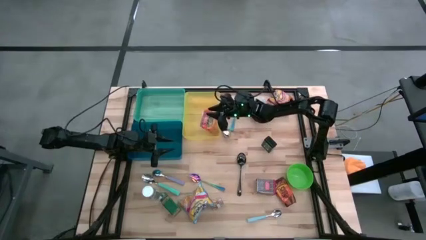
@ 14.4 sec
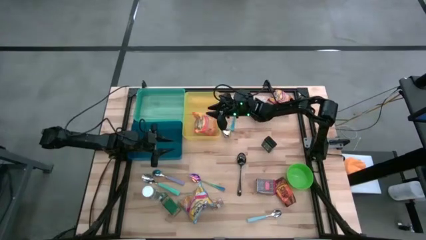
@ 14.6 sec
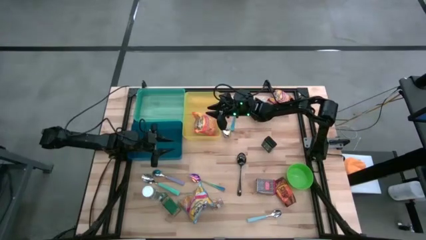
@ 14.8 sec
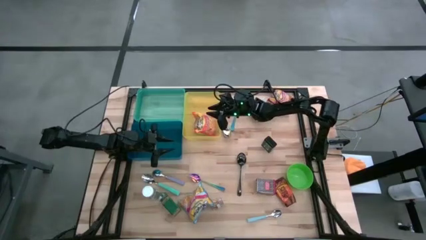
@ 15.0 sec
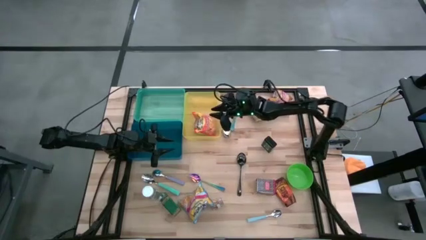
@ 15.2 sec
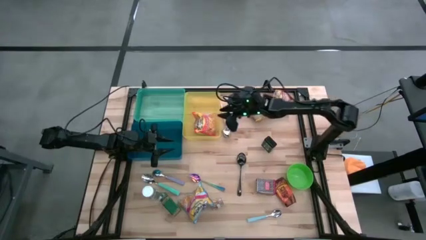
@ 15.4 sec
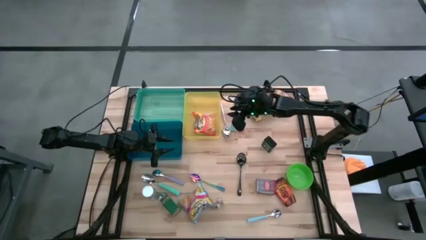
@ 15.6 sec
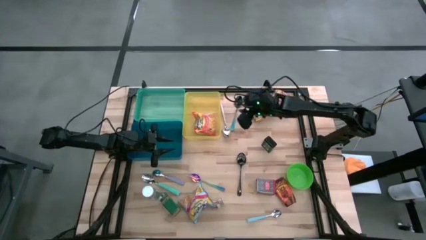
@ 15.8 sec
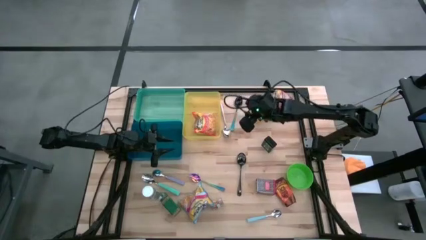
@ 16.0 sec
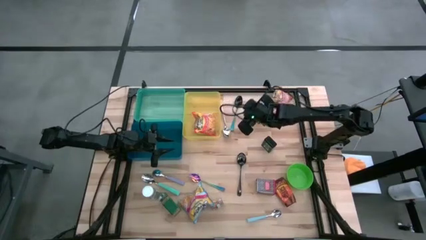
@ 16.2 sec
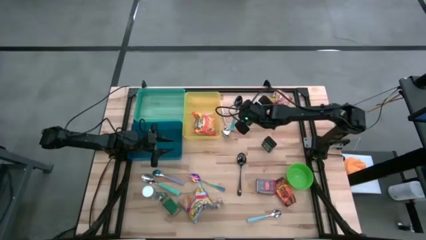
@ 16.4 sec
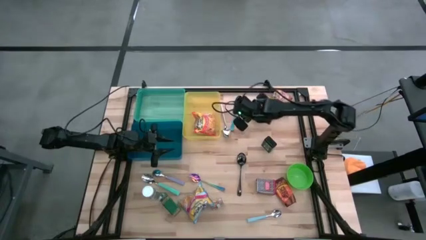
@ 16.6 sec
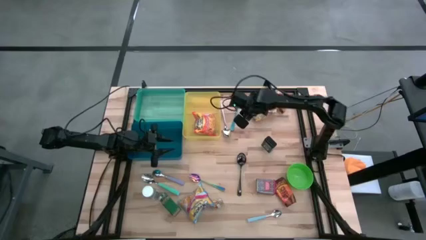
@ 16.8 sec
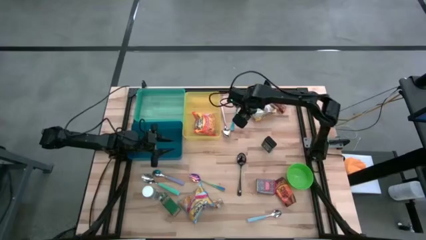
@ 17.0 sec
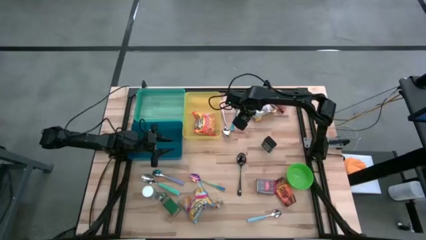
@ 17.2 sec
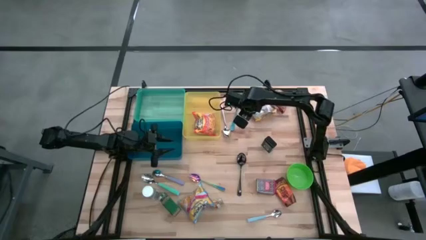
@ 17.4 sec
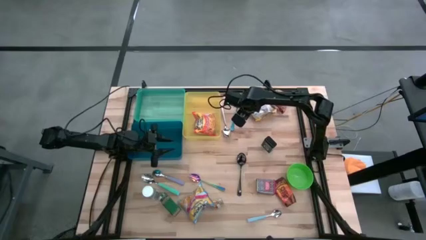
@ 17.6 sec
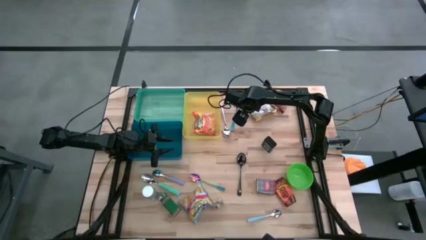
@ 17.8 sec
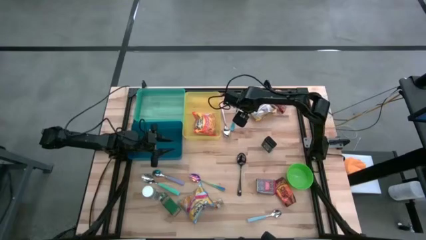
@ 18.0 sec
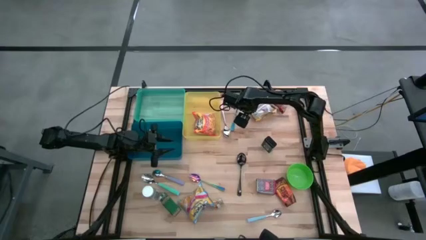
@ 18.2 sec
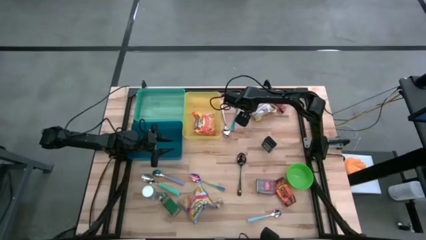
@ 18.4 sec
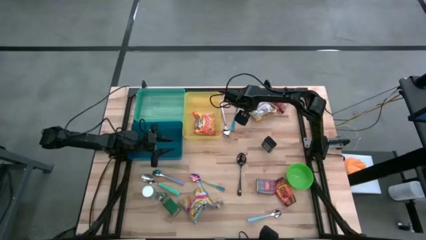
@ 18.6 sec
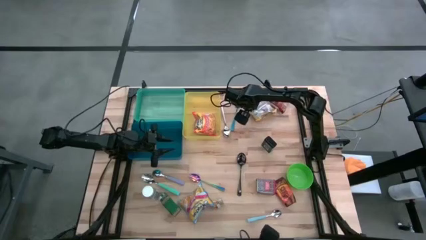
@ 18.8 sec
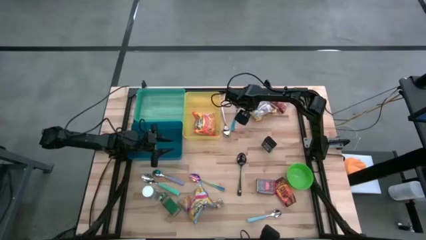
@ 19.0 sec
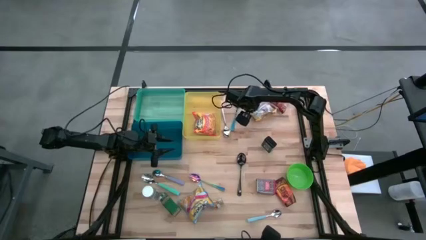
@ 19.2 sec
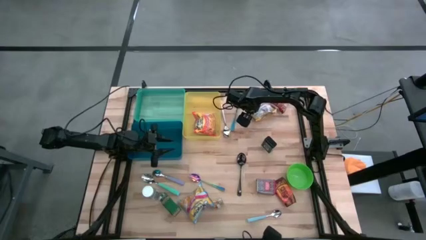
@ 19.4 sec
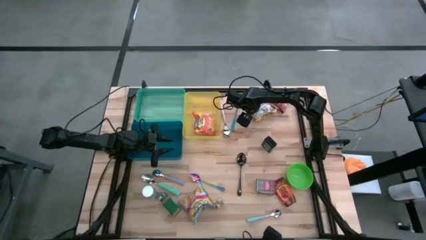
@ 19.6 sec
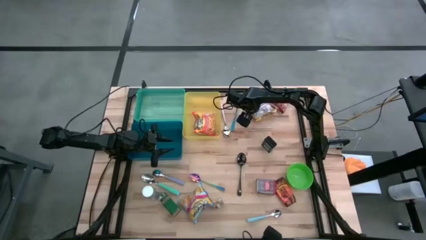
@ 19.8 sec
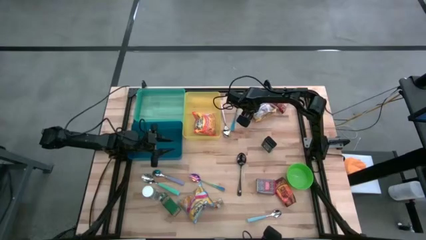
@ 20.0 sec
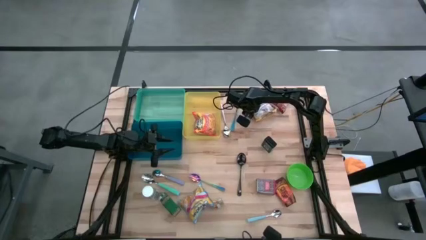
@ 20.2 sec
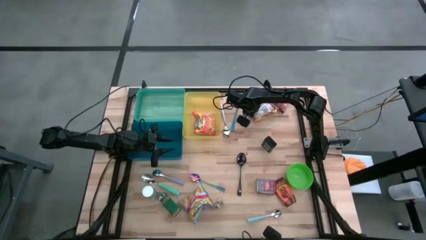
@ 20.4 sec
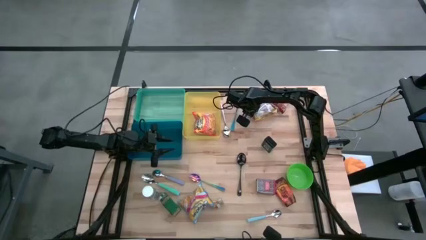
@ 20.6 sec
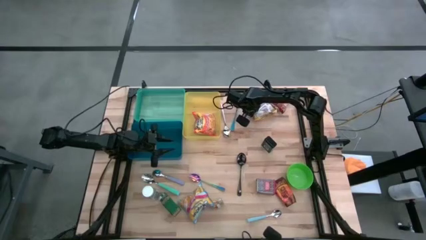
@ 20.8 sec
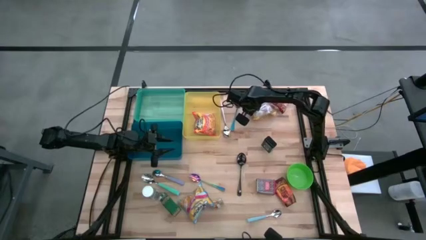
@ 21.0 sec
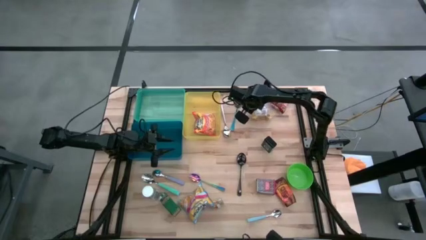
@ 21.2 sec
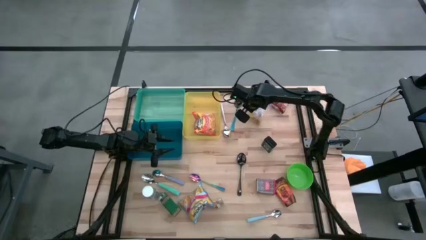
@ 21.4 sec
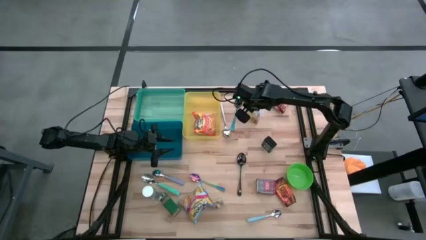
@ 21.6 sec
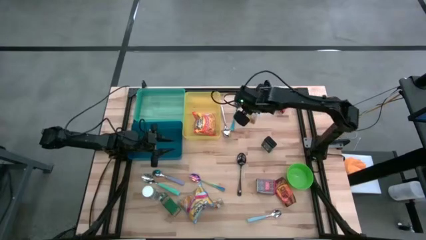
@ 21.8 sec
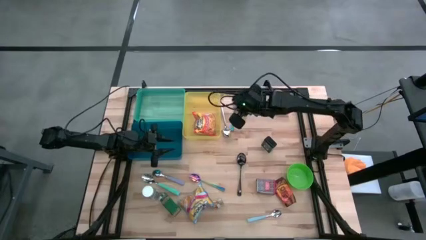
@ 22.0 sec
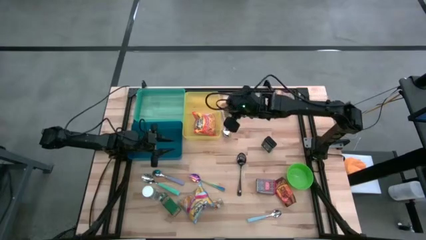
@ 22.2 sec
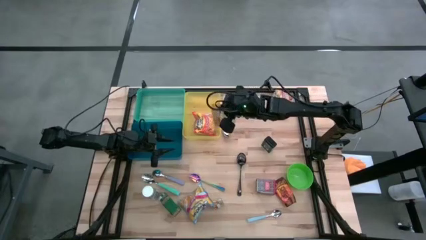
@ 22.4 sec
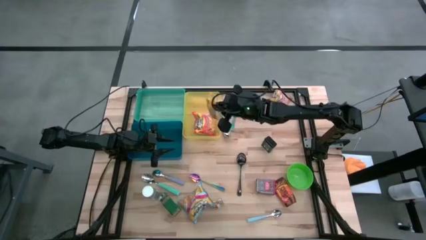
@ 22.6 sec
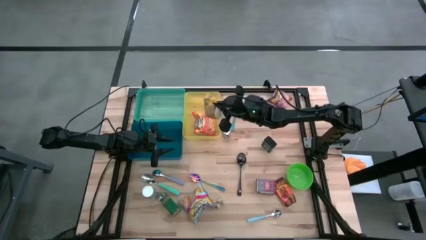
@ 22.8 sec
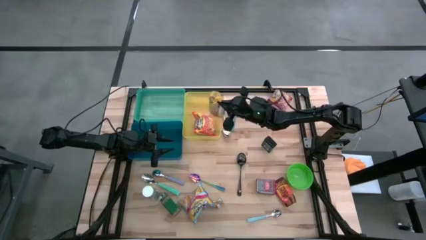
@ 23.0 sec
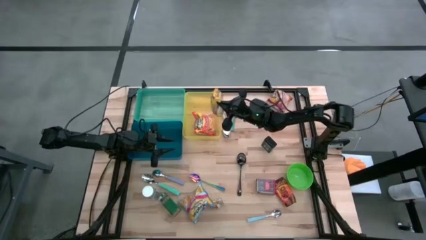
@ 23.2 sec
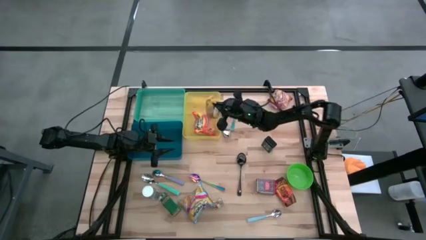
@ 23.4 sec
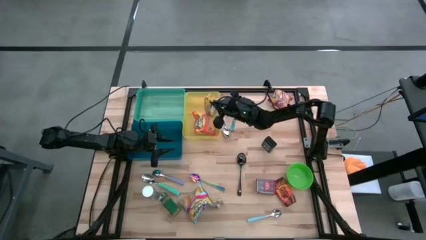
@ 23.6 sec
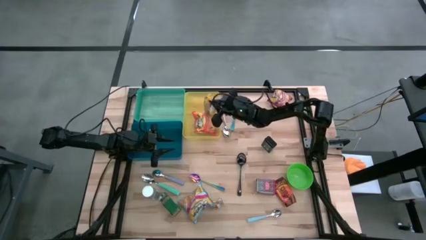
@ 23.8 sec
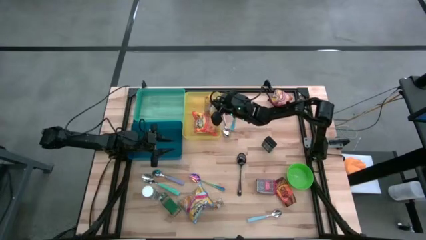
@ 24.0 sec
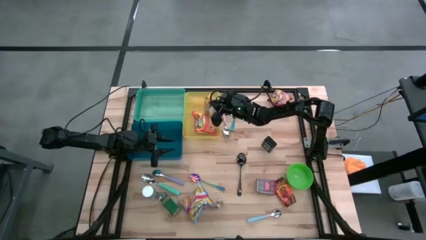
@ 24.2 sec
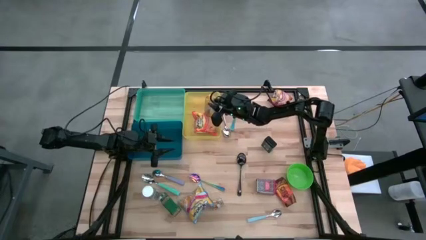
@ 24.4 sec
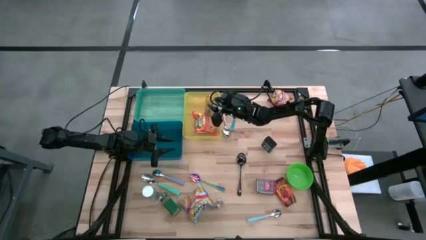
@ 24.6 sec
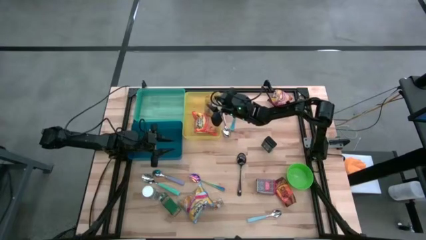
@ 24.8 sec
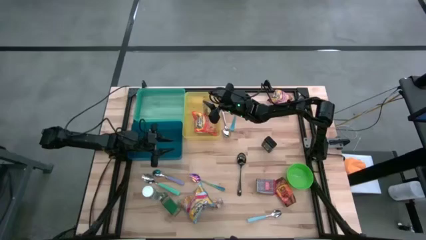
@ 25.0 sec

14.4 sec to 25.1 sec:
Put the yellow noodle pack into the yellow bin

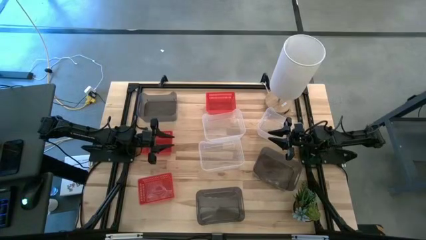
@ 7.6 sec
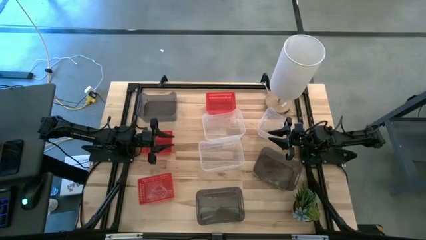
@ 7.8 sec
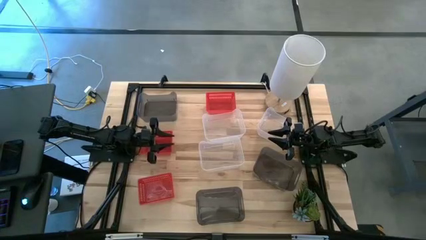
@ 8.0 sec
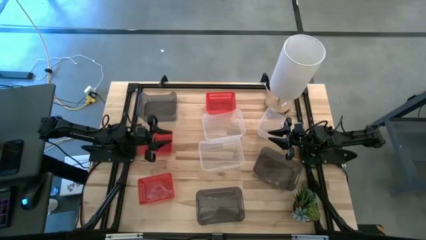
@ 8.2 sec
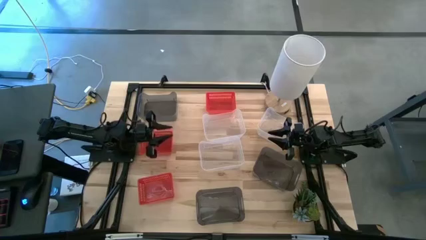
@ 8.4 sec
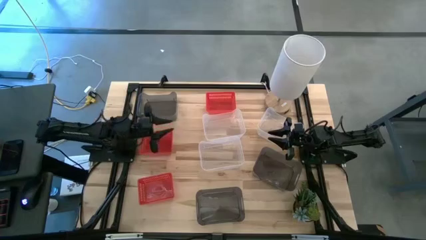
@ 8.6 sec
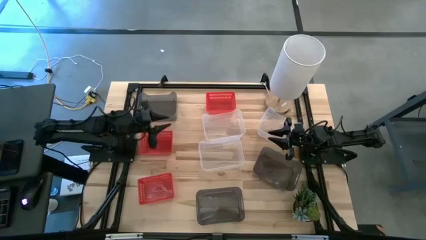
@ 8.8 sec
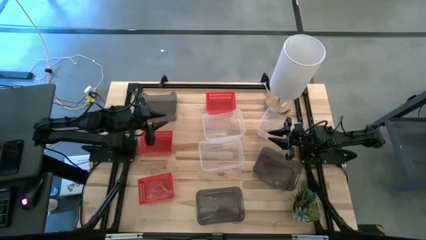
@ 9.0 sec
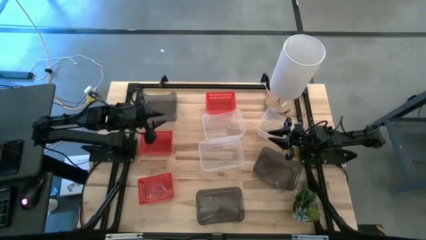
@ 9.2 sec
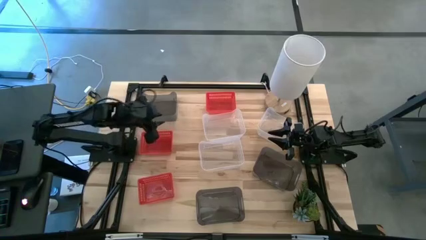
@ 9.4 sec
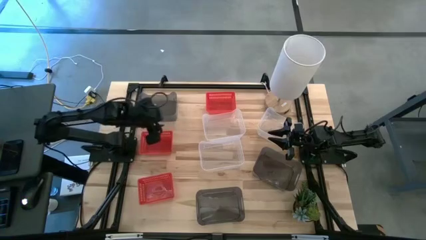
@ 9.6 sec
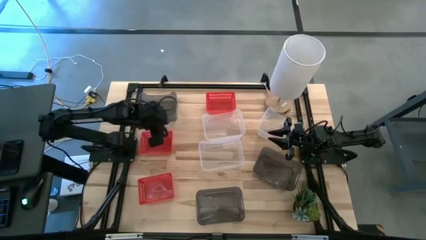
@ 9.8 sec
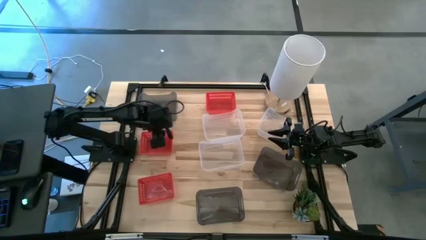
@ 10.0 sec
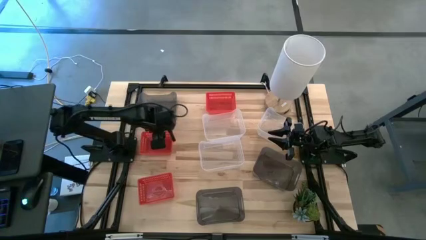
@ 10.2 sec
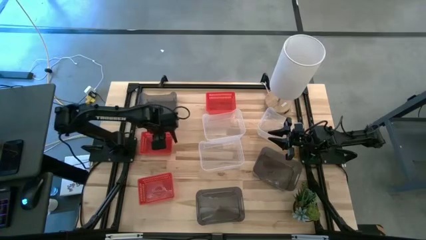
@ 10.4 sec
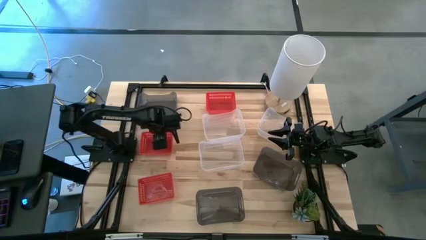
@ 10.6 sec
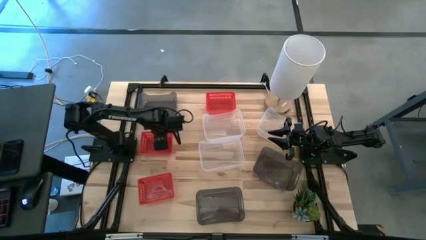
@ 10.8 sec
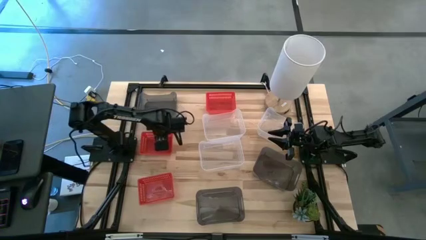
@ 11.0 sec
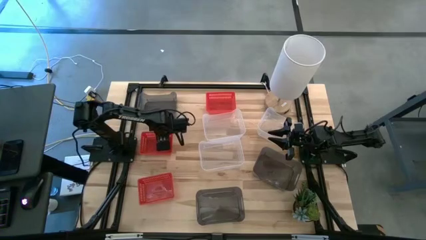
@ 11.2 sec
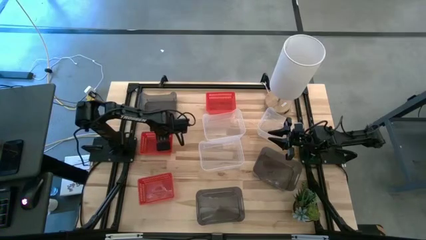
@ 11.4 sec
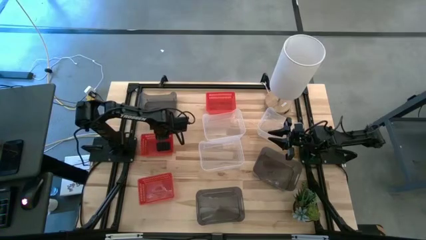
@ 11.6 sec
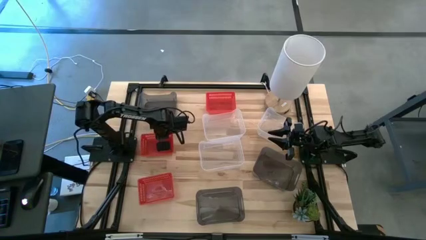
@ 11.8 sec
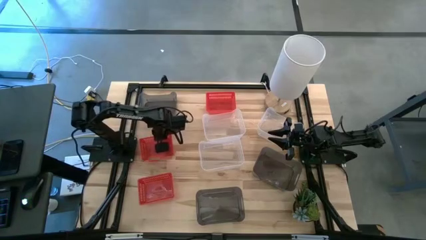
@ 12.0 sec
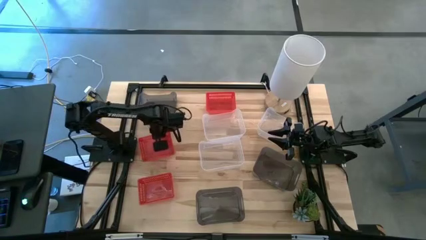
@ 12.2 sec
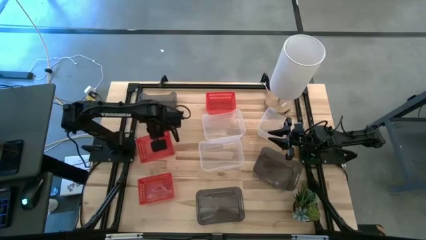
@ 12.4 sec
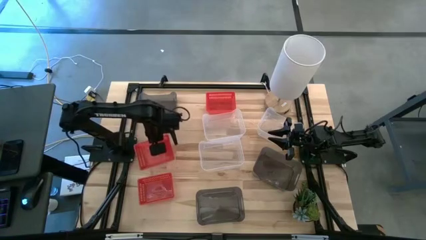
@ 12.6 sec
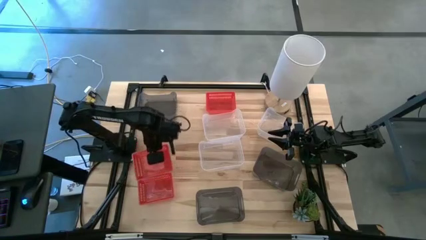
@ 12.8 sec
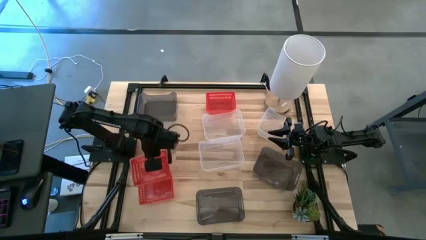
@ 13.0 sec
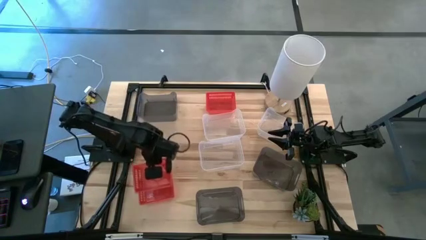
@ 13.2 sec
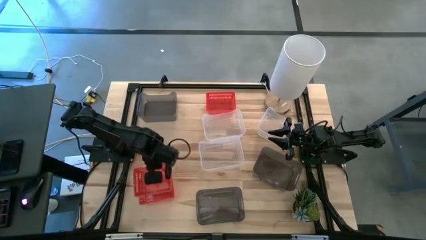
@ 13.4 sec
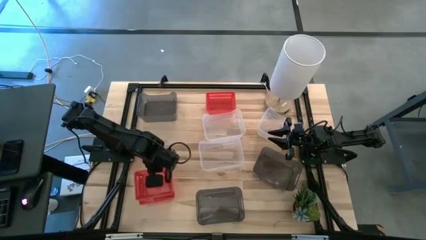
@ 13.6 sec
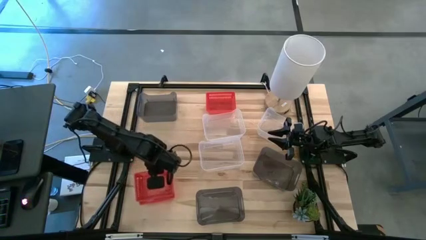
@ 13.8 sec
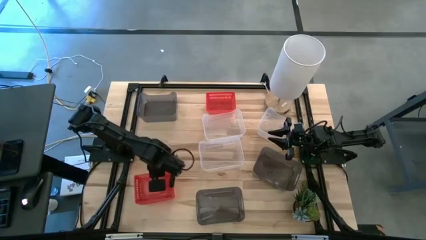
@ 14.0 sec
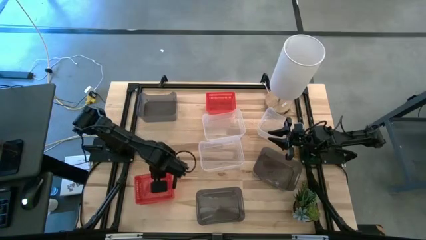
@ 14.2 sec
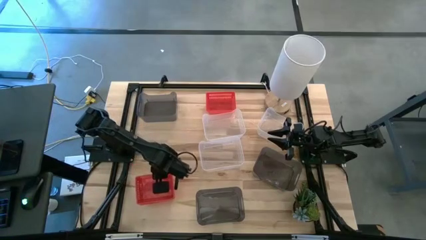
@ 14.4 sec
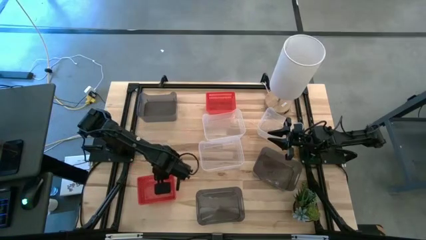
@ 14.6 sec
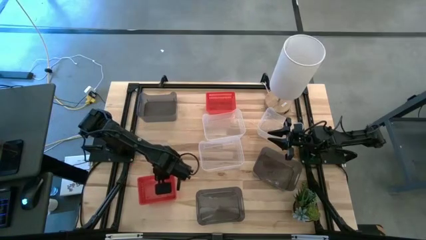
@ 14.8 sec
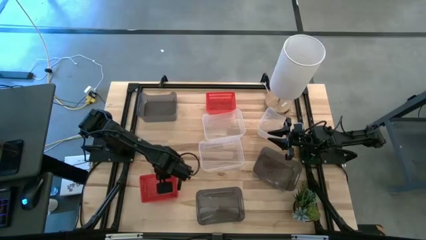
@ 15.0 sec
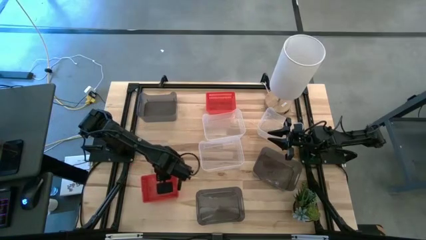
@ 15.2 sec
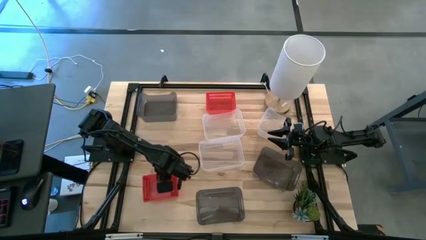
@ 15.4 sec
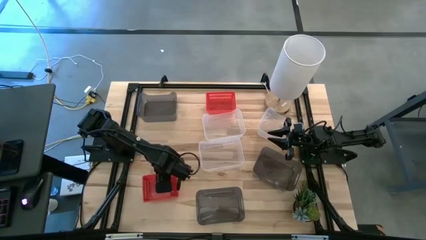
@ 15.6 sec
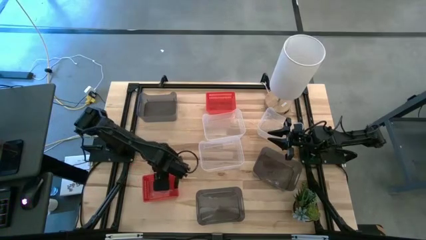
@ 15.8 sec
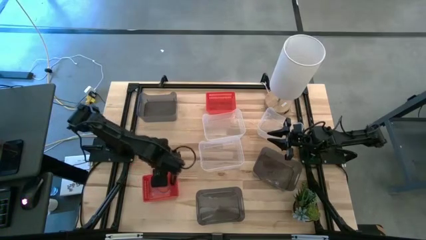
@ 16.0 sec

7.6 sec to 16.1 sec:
Stack the center red bin on the bottom red bin
